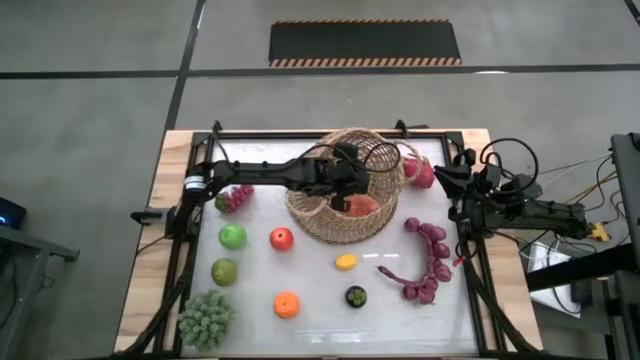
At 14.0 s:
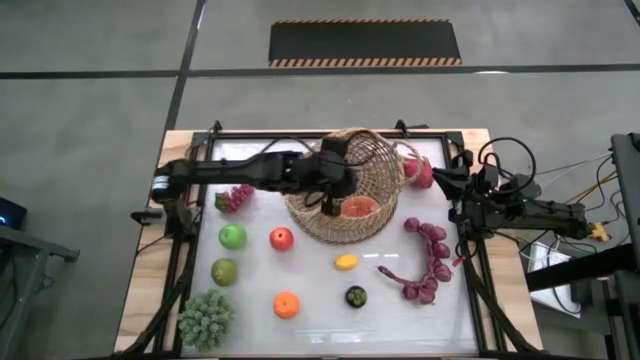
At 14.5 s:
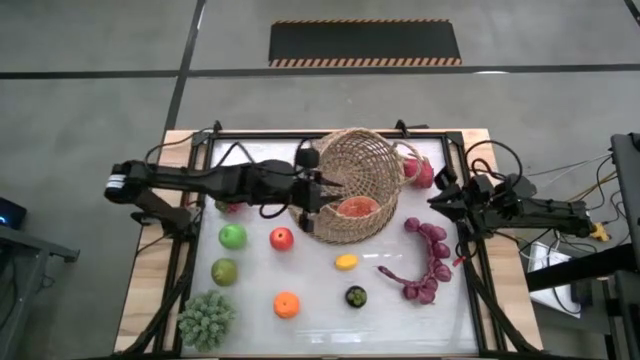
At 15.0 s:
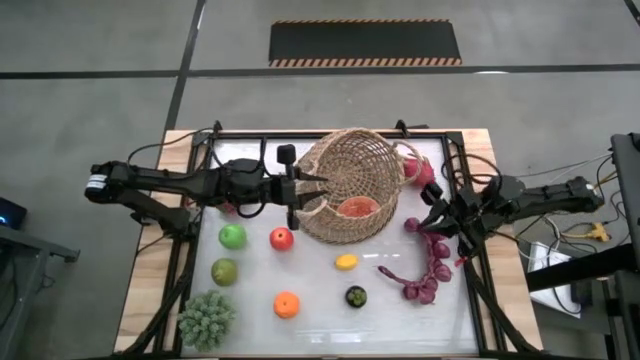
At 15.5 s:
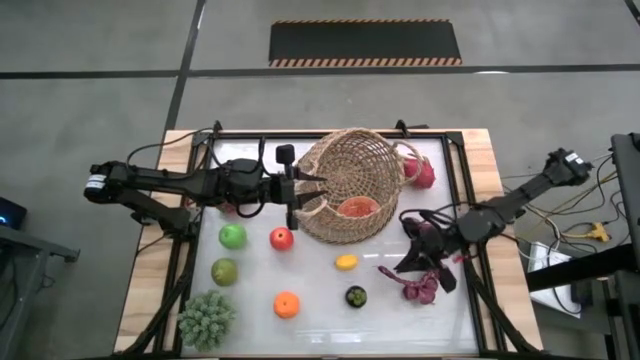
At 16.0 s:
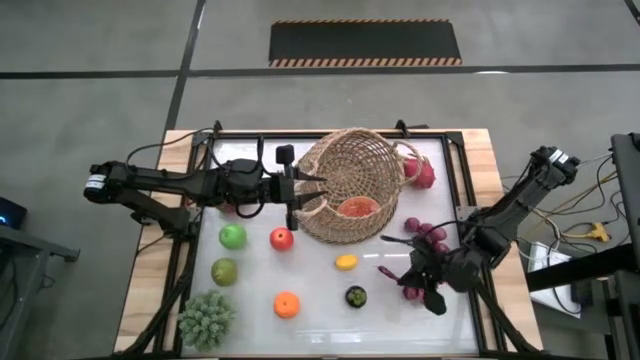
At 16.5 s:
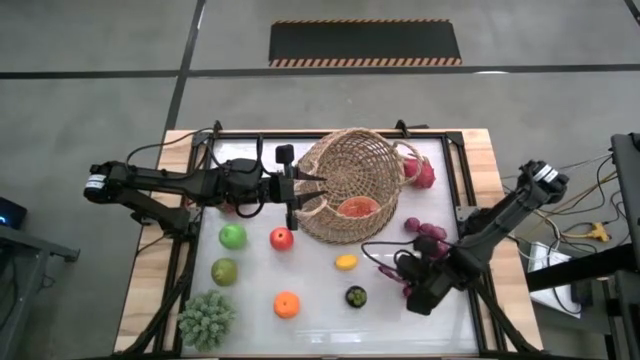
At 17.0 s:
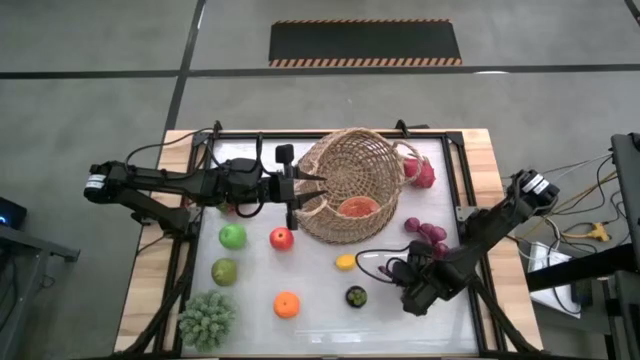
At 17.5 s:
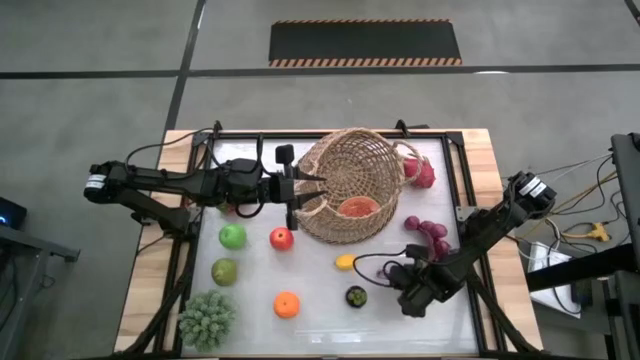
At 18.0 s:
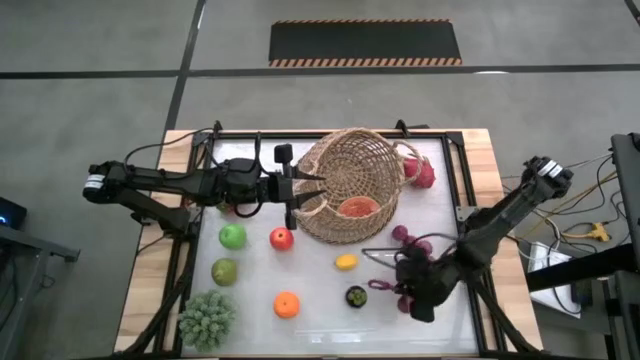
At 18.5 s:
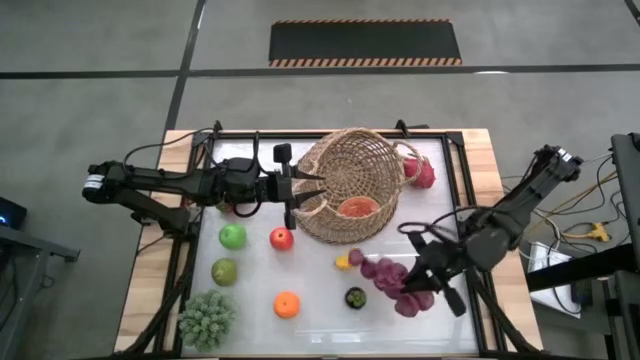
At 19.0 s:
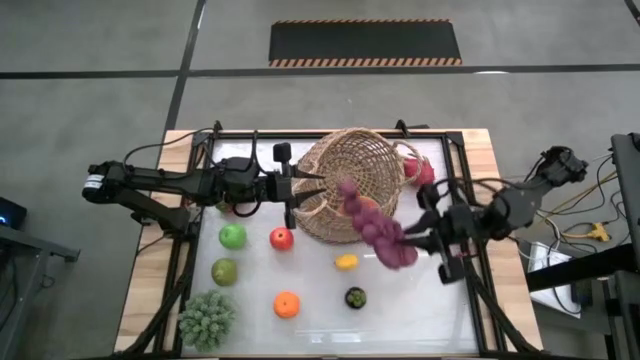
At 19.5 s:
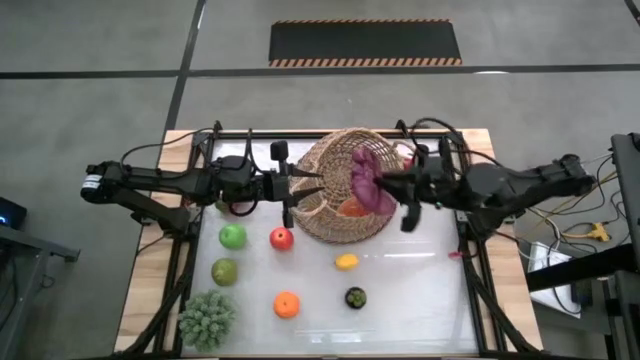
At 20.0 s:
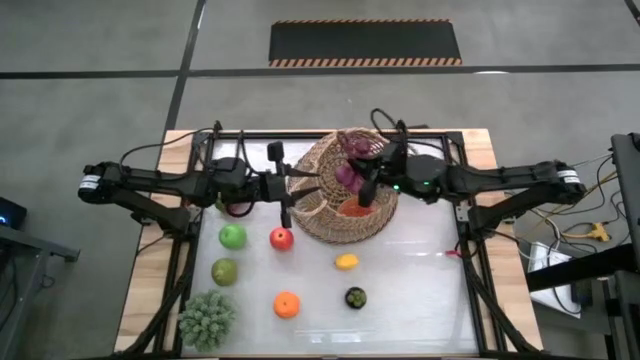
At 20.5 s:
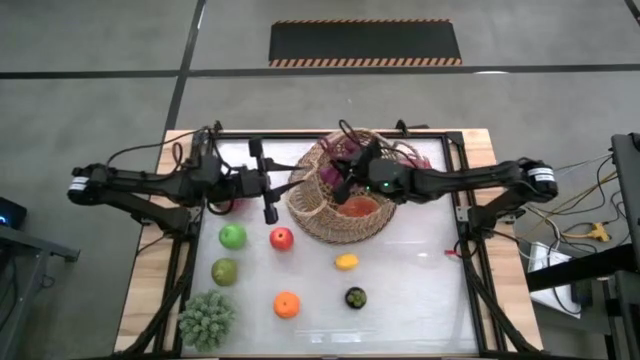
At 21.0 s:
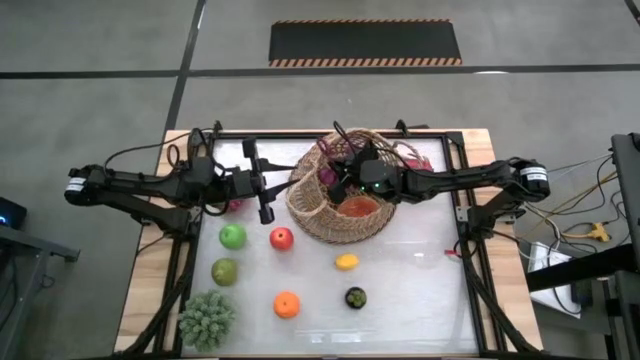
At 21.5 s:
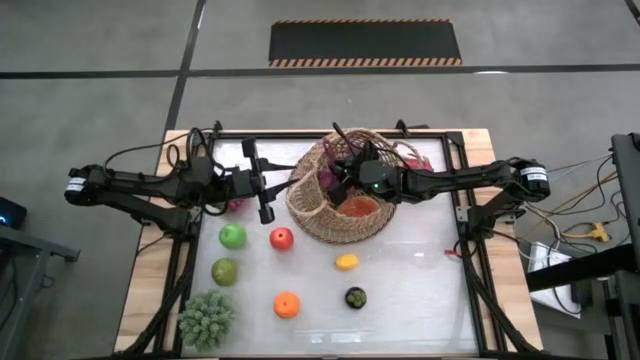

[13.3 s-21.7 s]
Task: Build produce basket
Put the purple garlic into the brown basket

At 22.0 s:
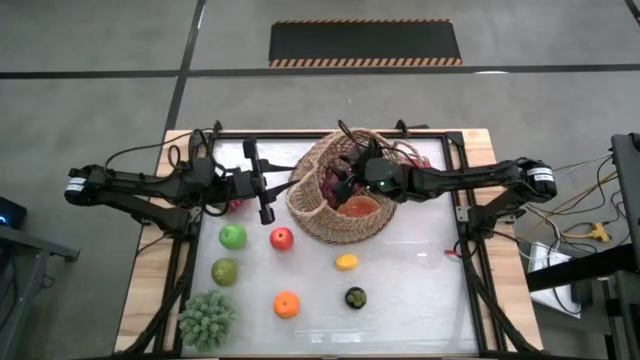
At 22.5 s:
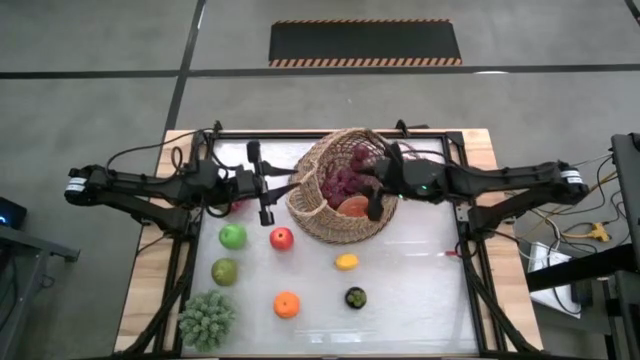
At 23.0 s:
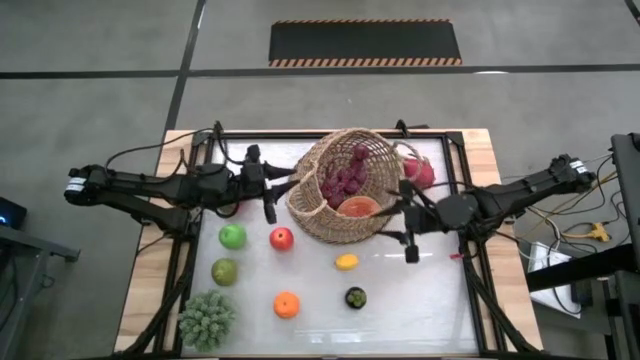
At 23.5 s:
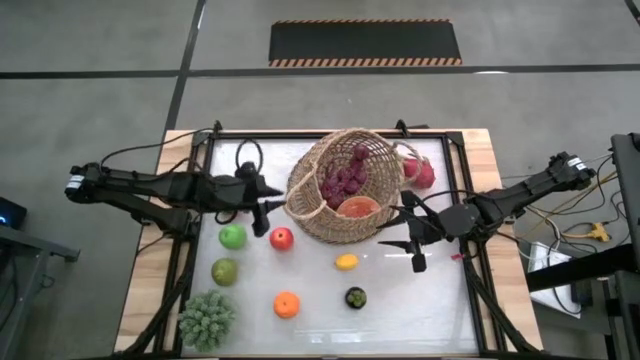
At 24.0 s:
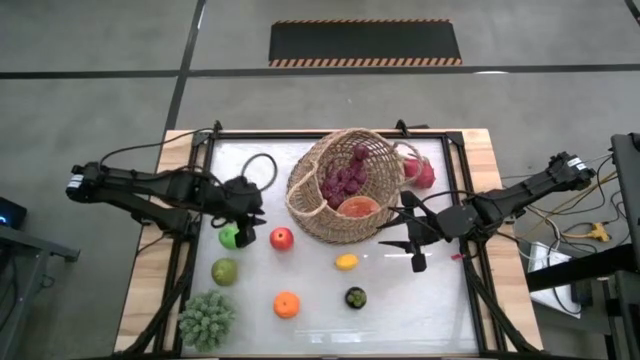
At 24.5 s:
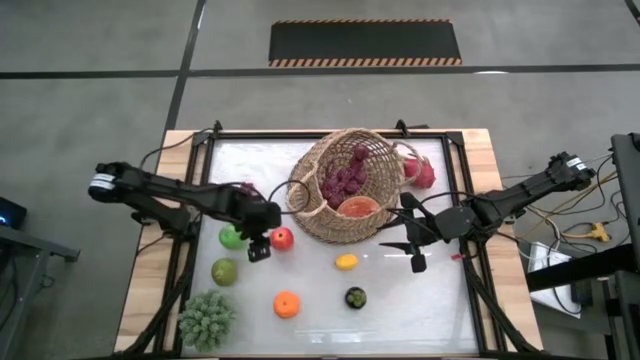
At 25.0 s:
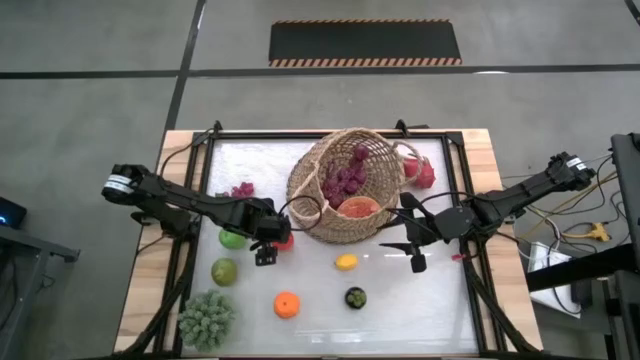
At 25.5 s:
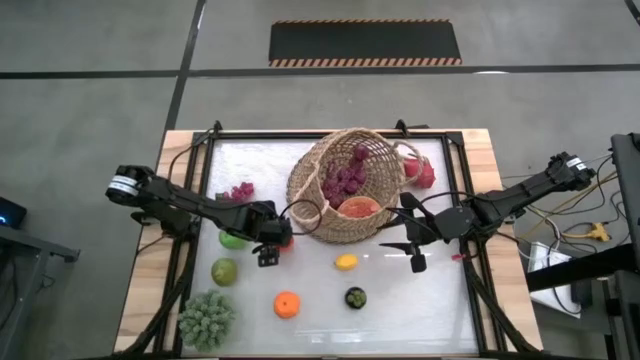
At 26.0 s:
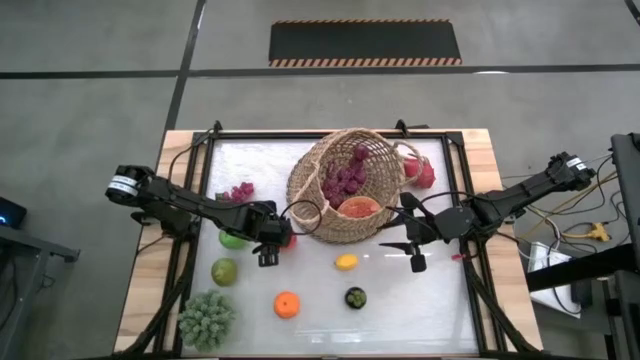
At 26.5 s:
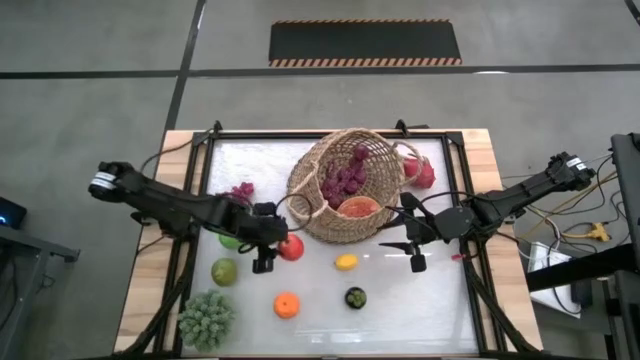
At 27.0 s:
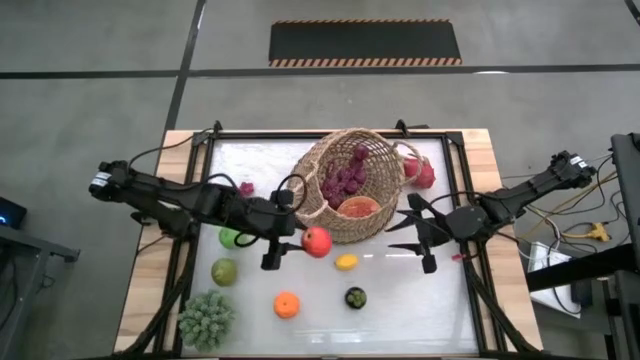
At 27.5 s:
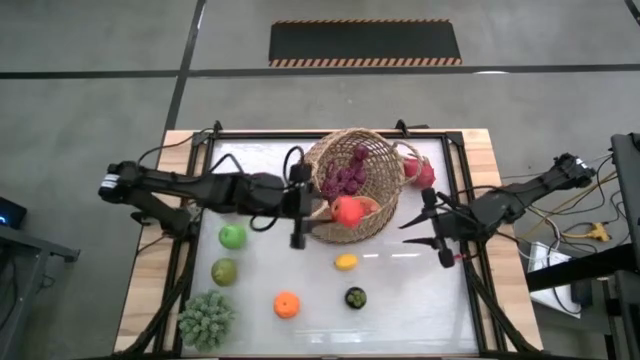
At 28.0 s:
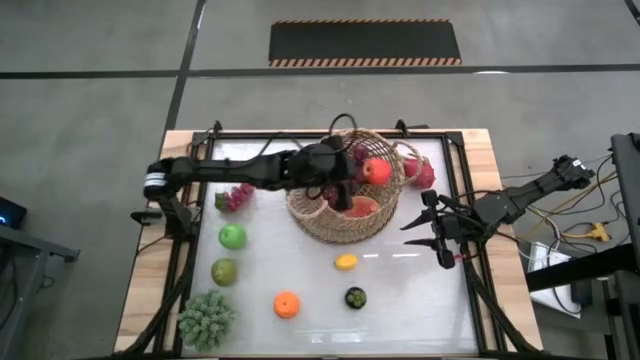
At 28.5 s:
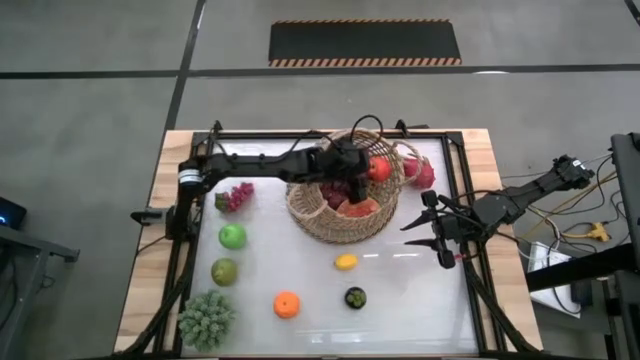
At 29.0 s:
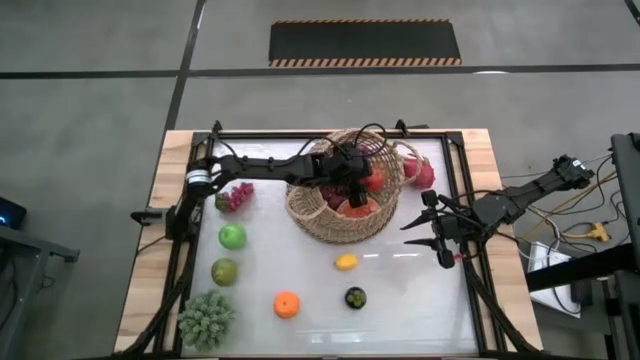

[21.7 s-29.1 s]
Put the red apple into the brown basket

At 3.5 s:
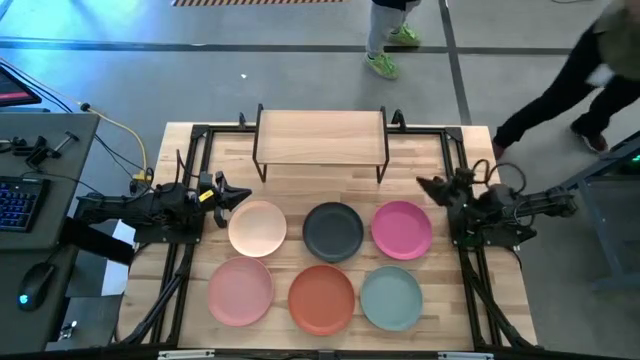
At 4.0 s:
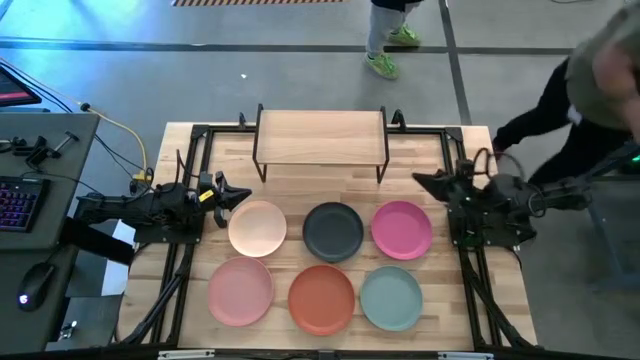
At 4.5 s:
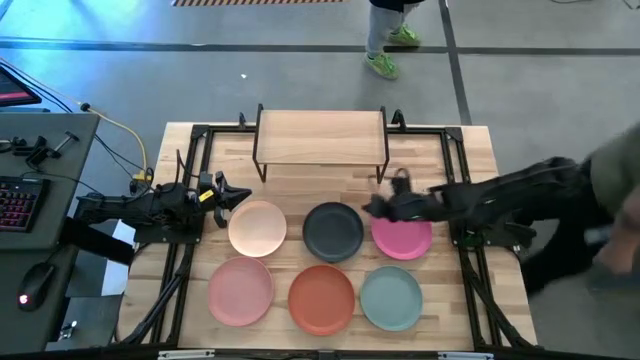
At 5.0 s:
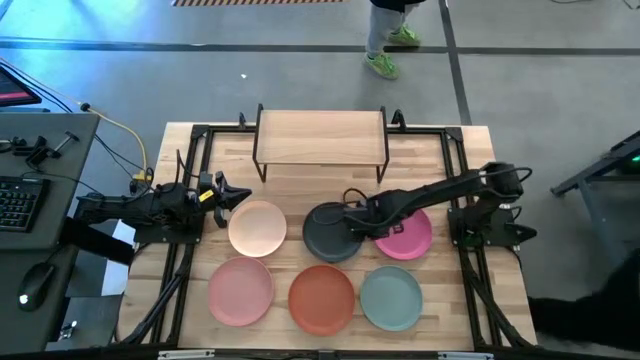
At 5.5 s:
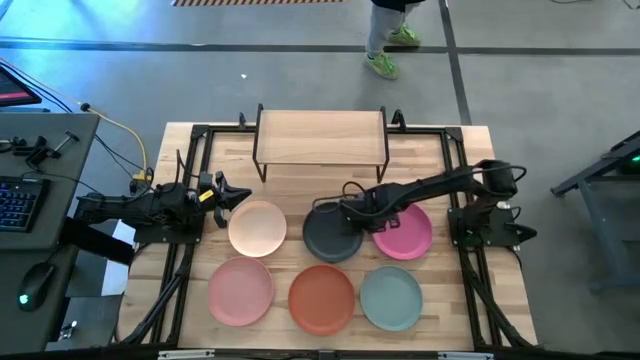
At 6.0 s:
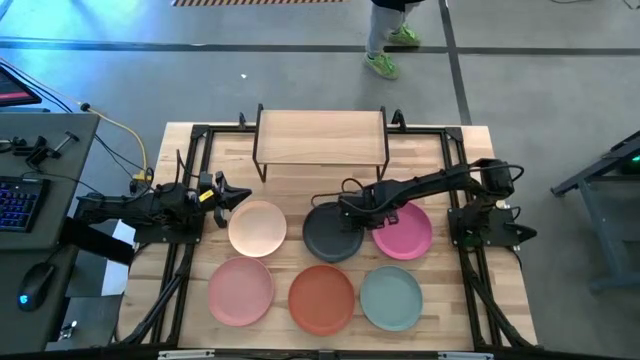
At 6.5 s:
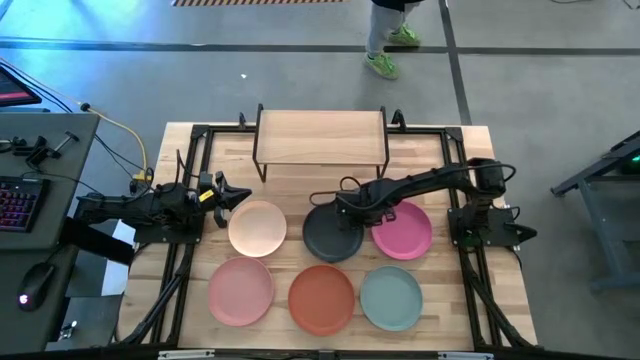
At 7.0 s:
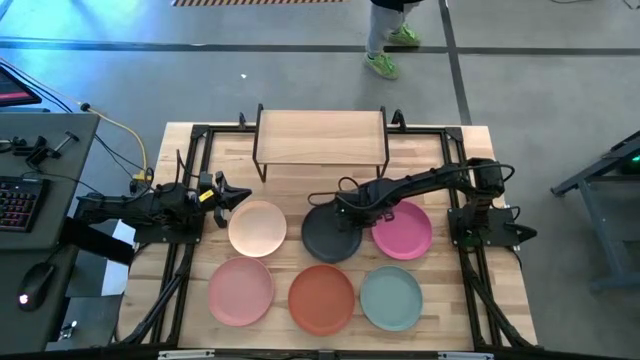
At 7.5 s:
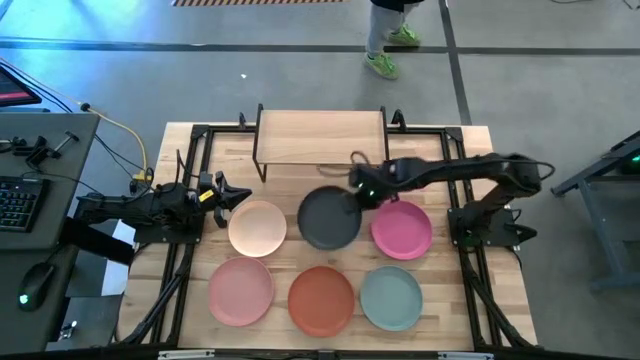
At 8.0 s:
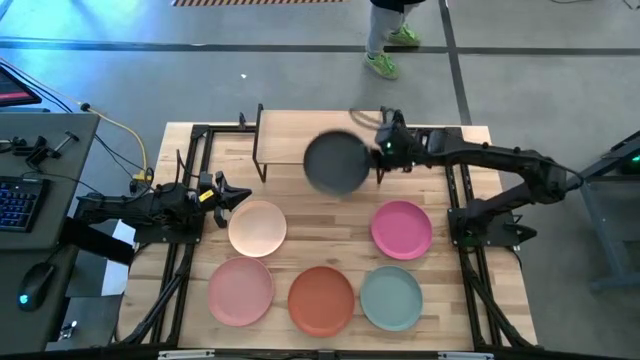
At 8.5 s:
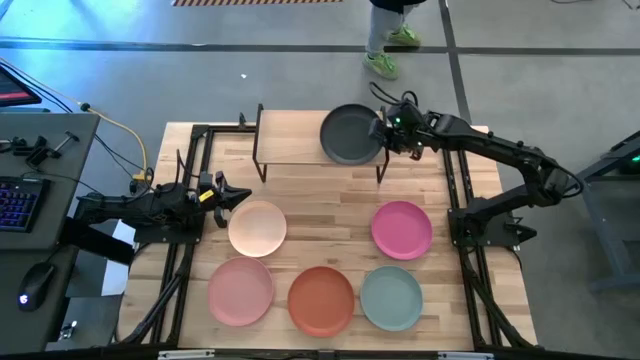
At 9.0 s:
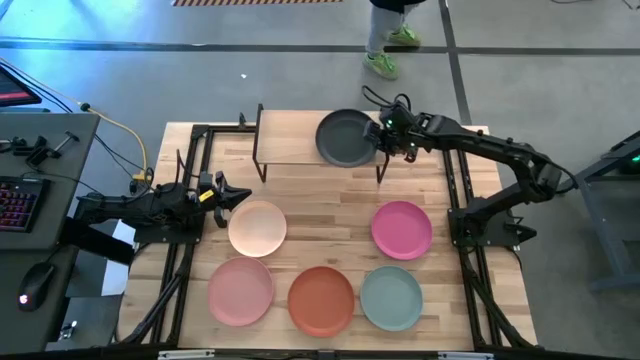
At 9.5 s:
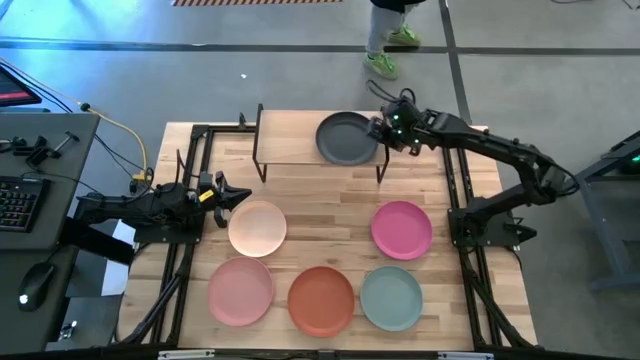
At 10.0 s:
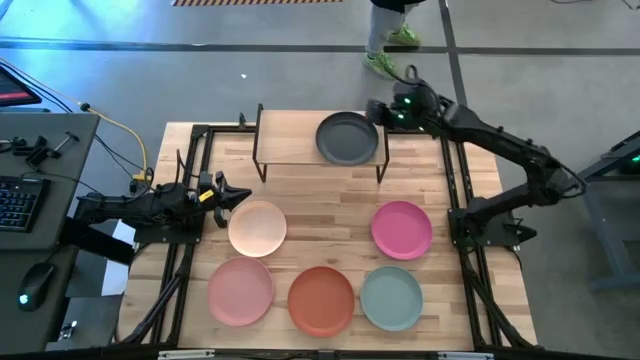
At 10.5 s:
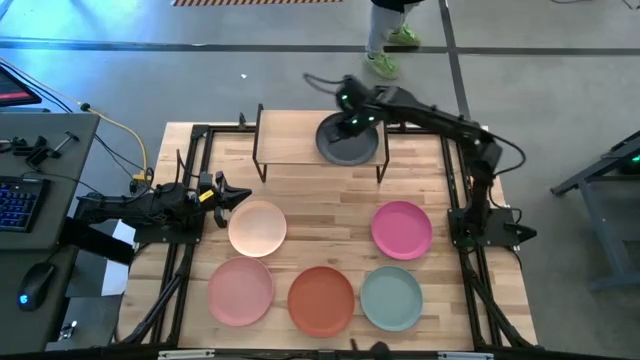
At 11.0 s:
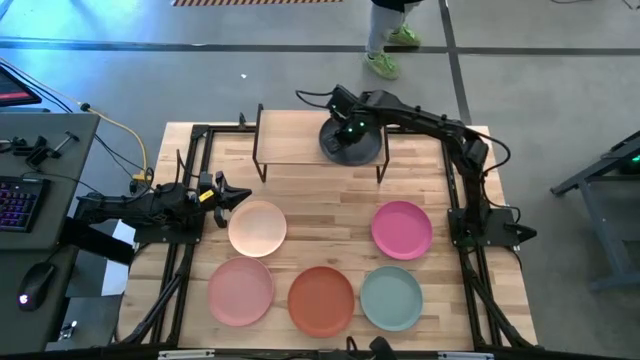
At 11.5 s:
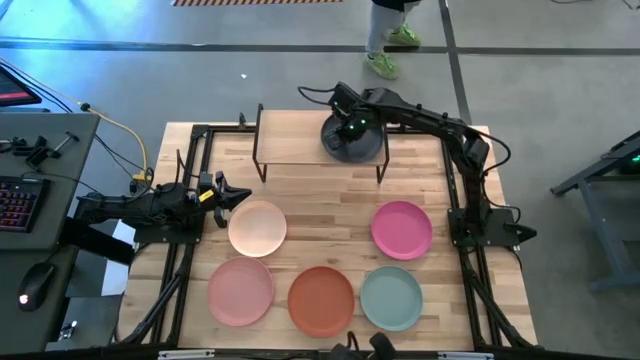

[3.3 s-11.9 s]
Task: Place and stack plates onto a shelf
Put the black plate on the shelf
